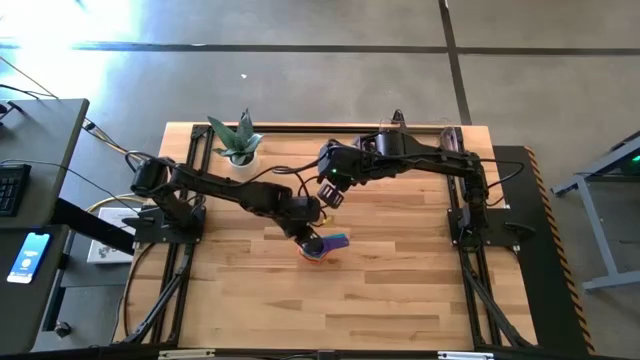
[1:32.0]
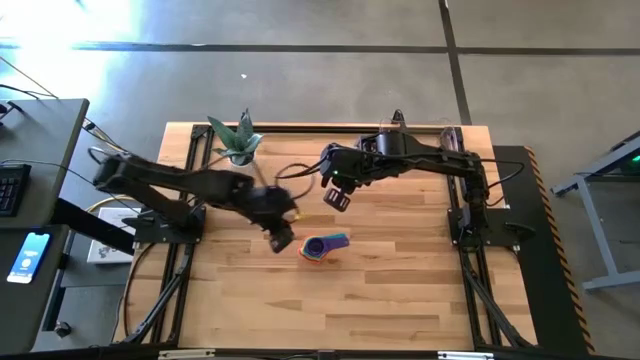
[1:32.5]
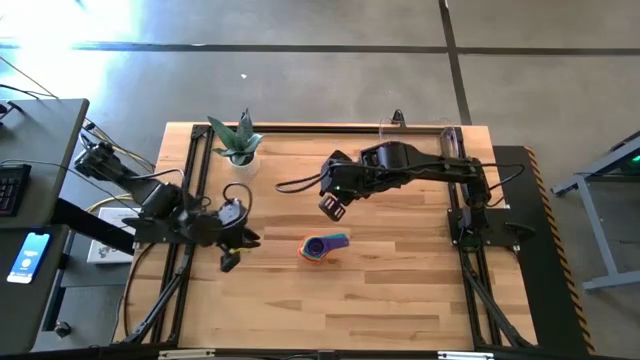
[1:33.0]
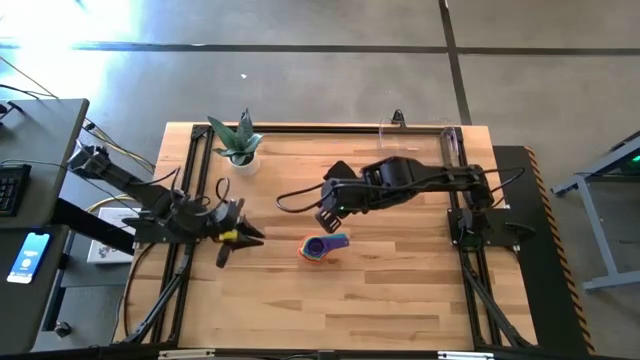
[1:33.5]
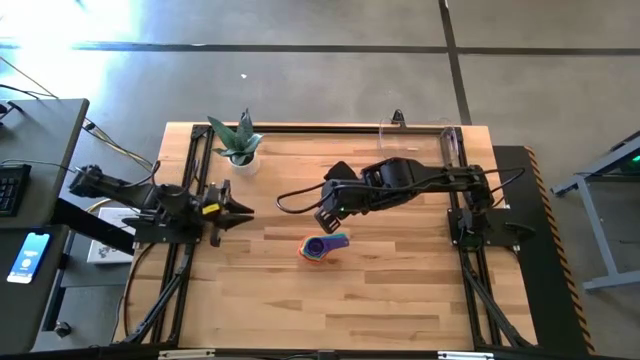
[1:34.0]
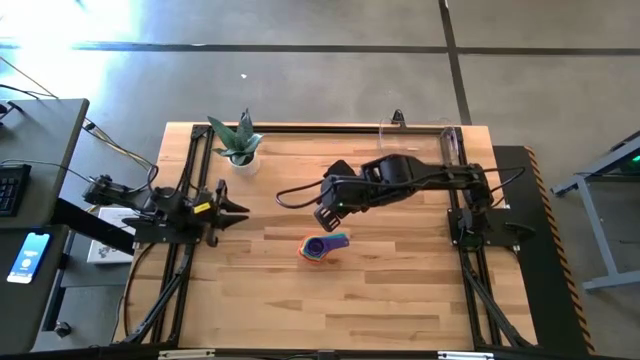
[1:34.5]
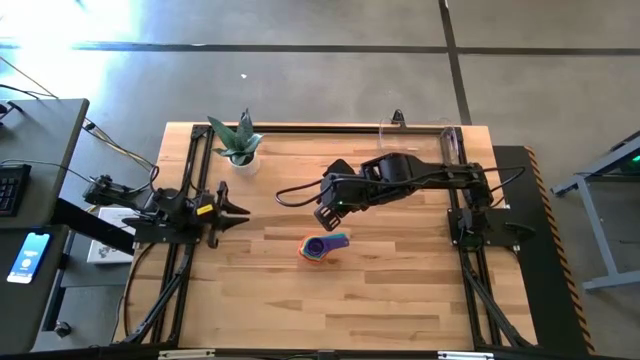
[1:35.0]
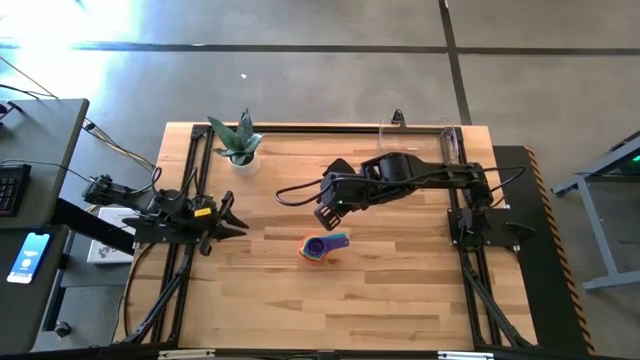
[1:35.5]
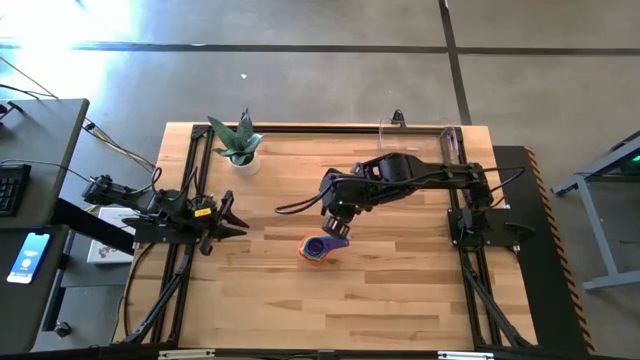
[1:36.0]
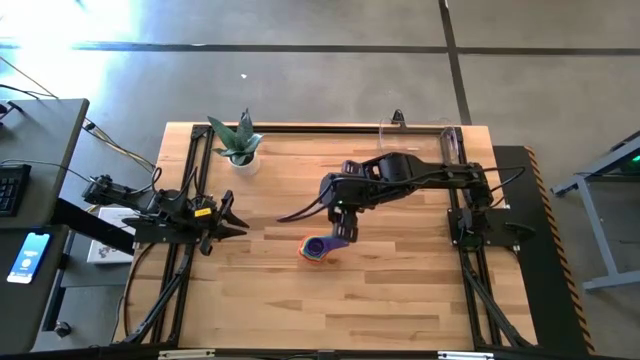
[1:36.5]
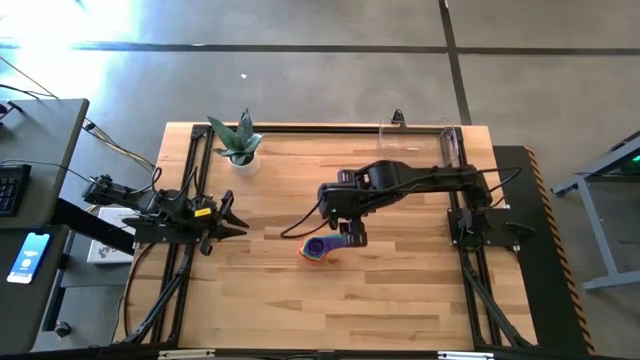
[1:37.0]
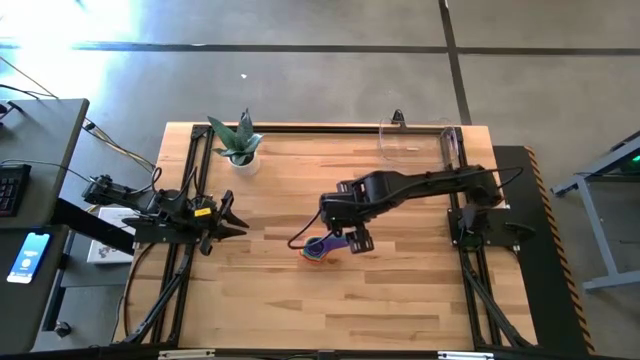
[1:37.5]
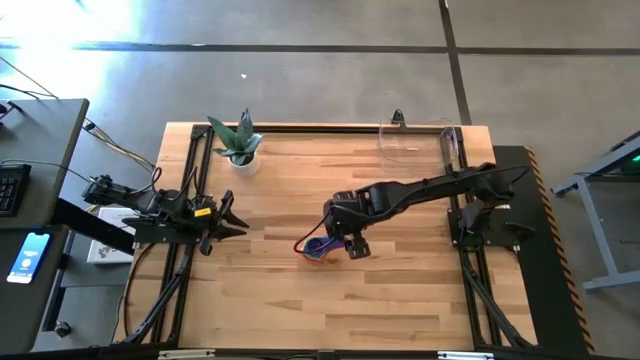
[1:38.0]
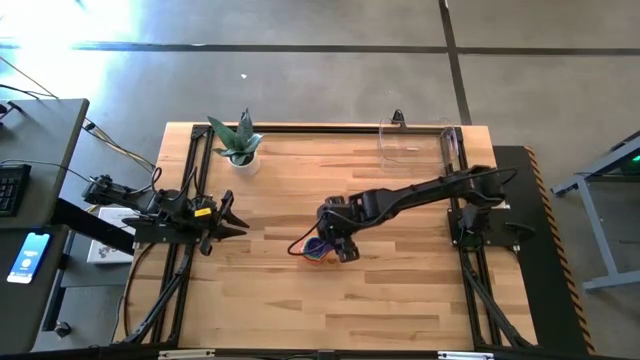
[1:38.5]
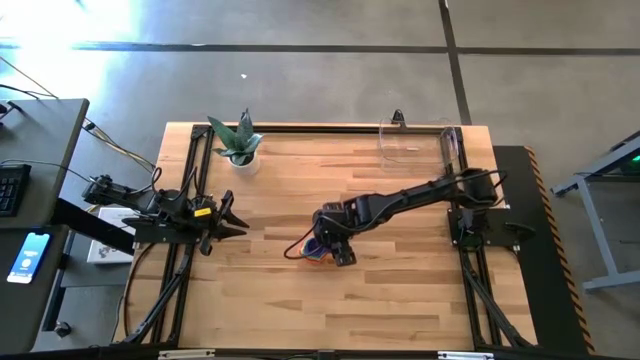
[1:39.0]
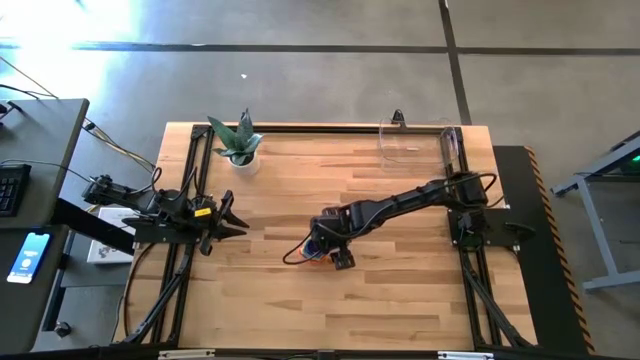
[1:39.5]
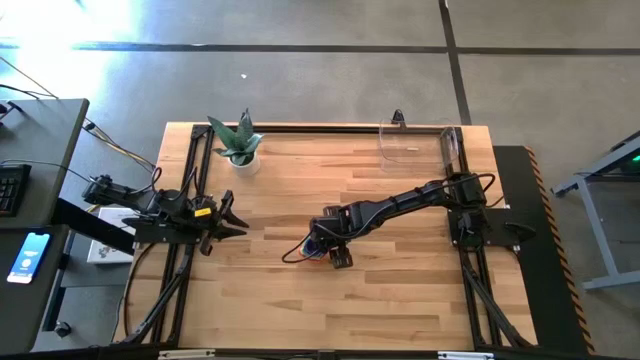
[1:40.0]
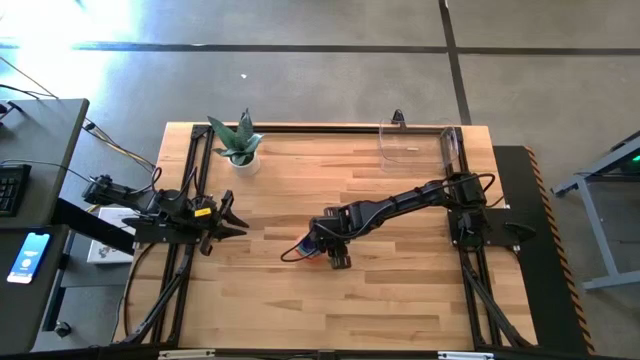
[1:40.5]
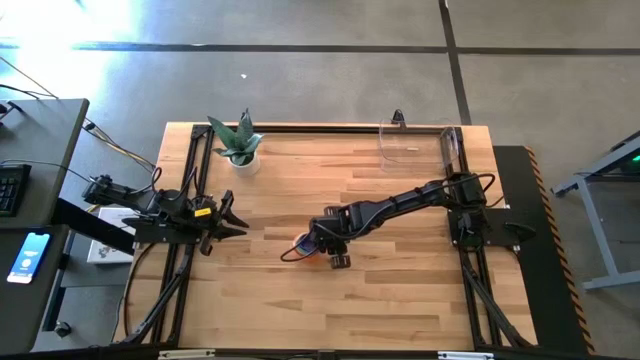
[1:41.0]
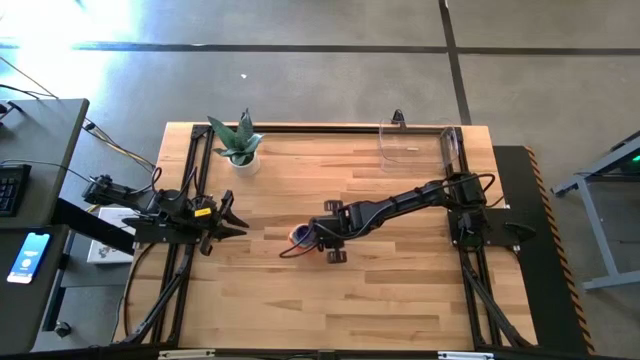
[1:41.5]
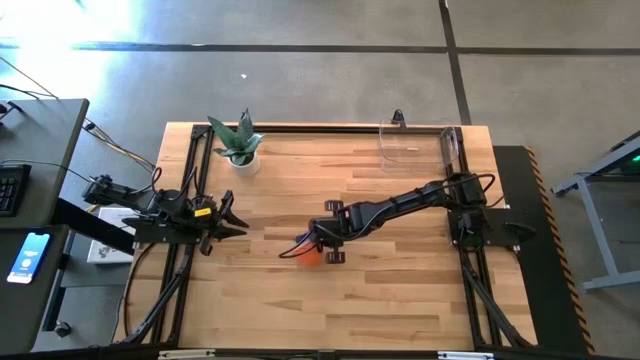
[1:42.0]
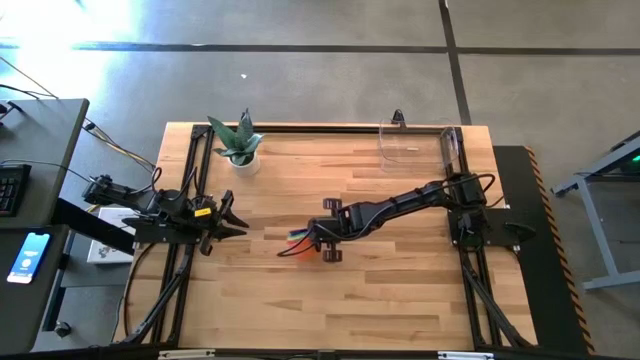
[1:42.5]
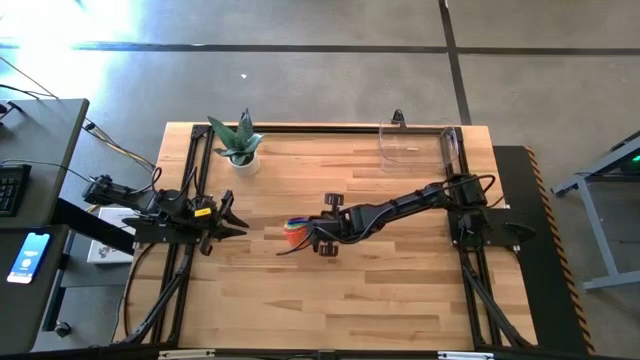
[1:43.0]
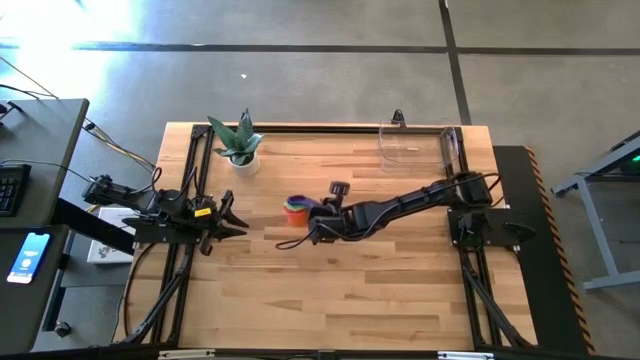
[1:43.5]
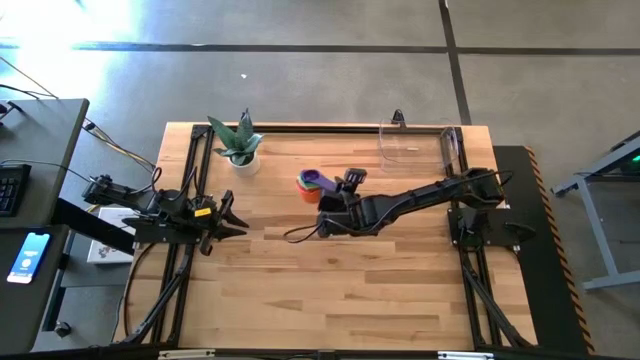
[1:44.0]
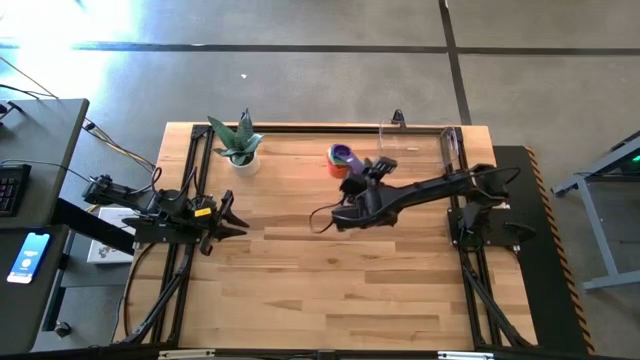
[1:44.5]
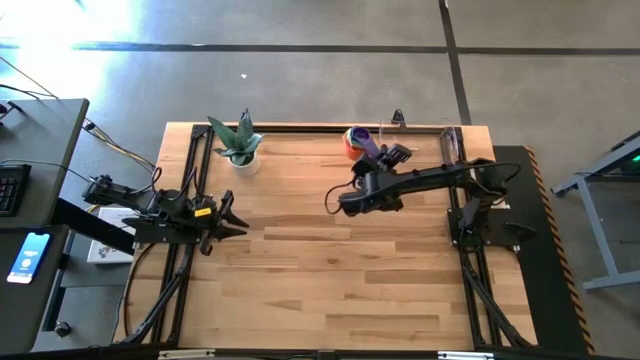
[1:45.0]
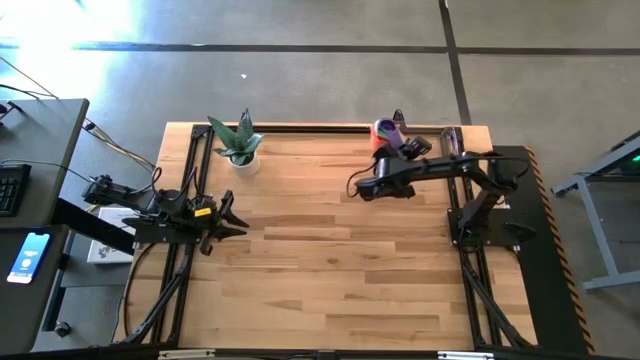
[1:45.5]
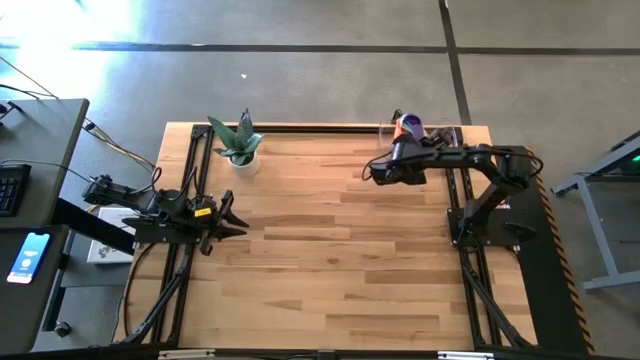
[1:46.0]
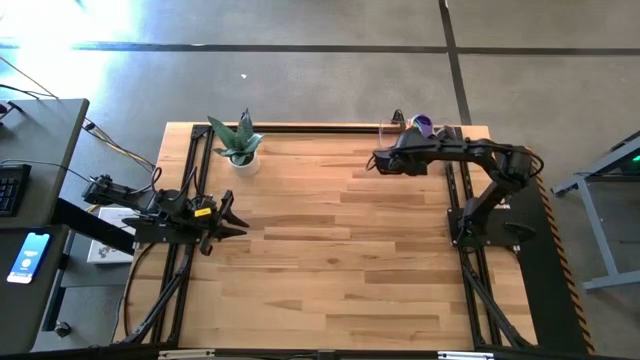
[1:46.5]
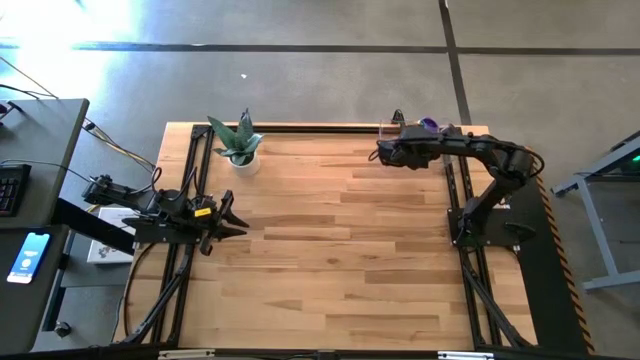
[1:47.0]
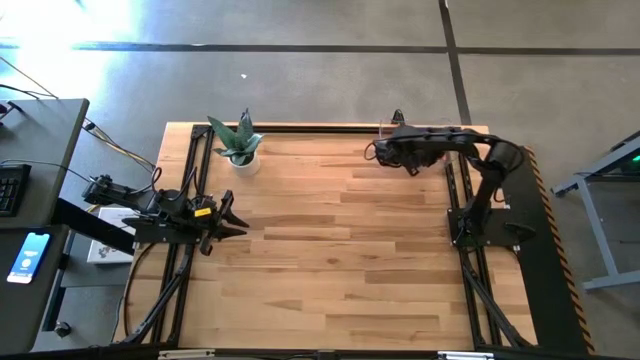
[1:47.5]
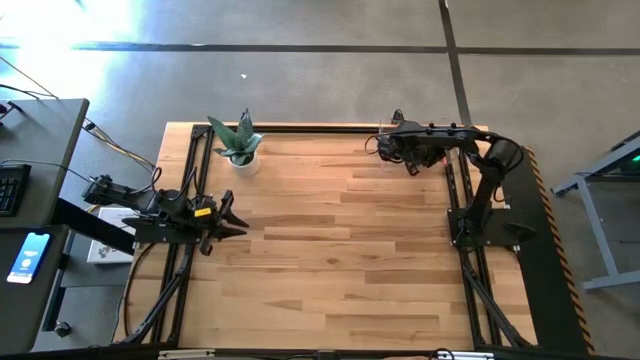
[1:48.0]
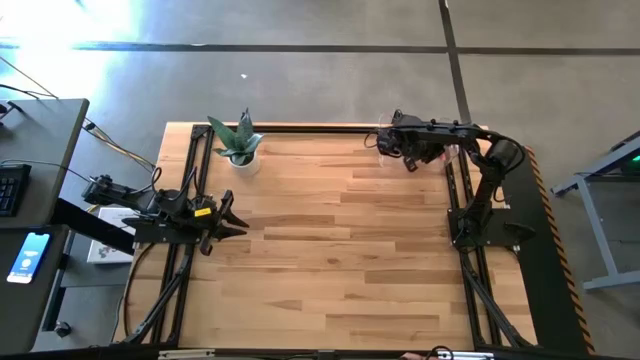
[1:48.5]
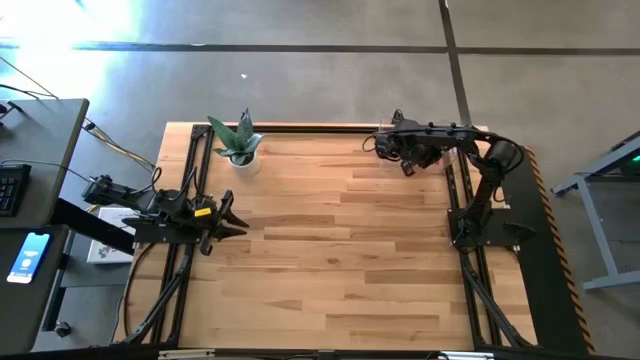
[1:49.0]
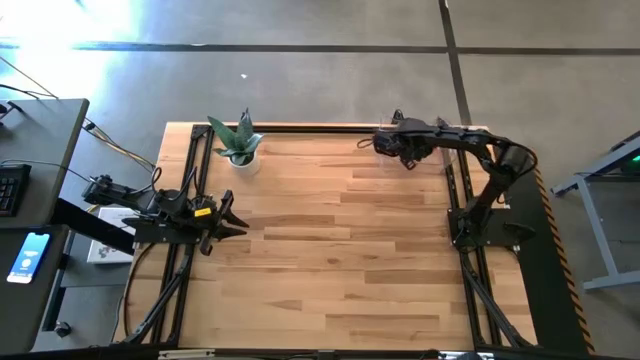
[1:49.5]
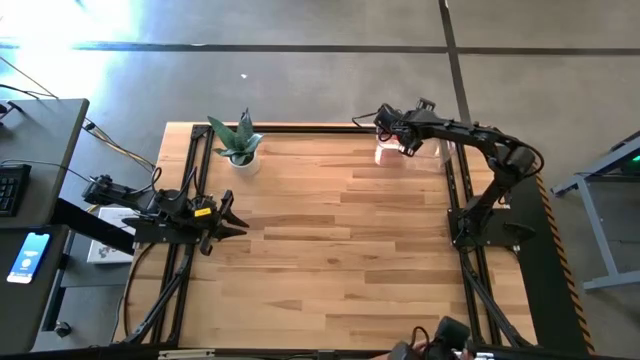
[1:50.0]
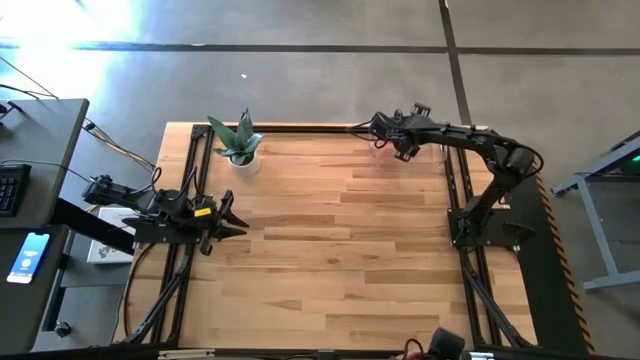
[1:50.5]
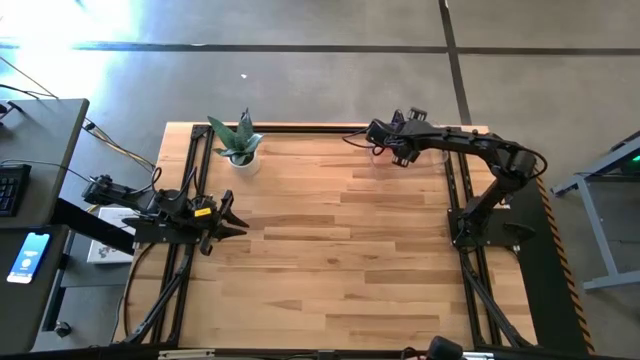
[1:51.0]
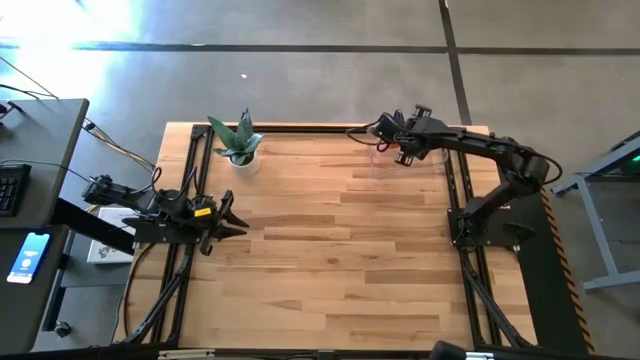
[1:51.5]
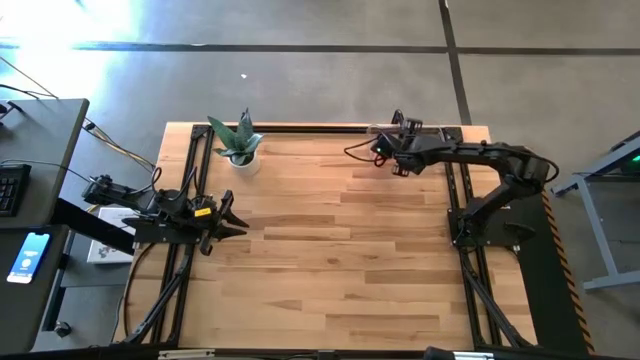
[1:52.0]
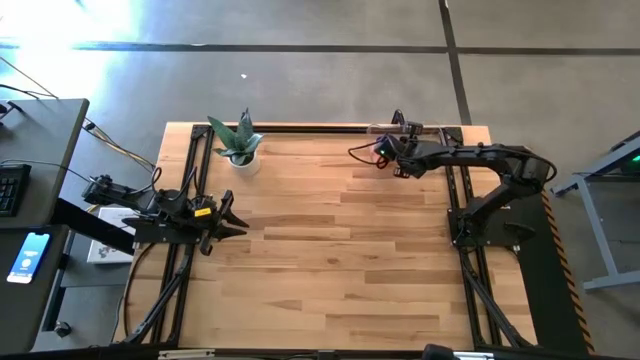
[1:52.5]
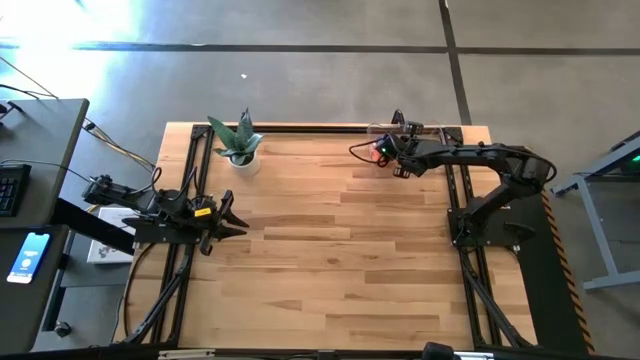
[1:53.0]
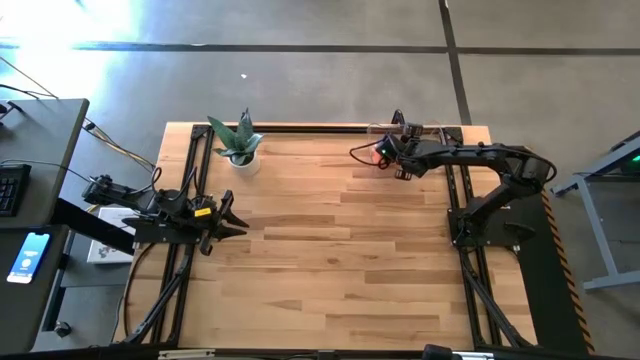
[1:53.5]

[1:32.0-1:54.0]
Task: Nest measuring cups in basket
Put the stacked measuring cups into the transparent bin
